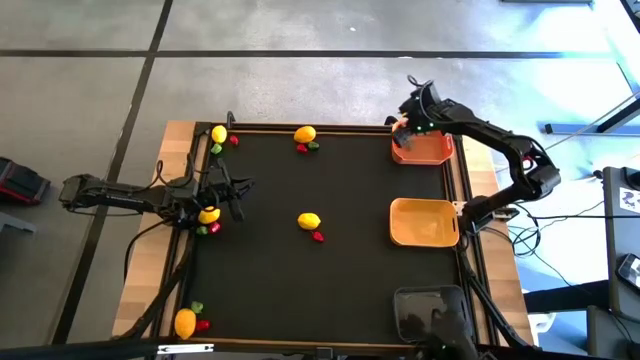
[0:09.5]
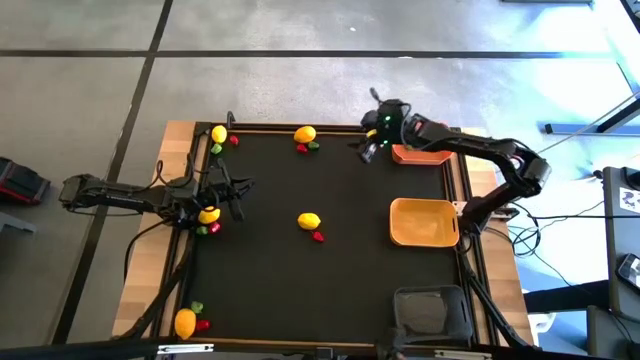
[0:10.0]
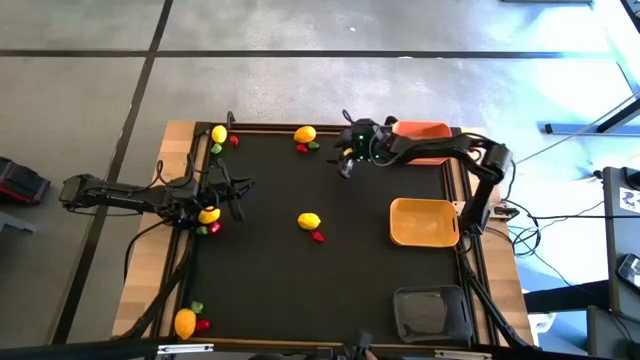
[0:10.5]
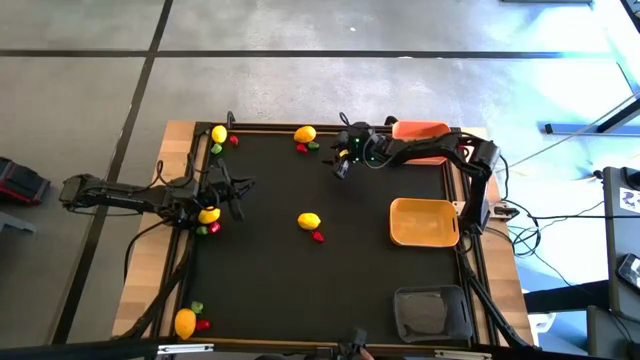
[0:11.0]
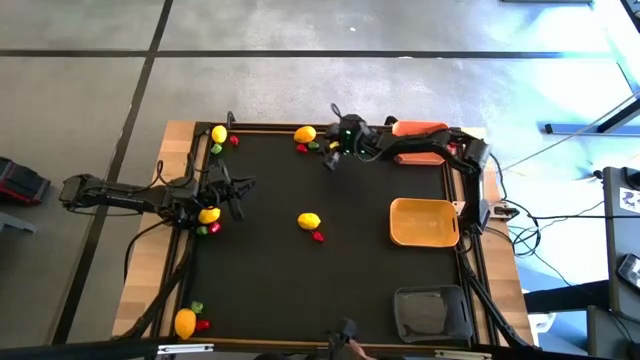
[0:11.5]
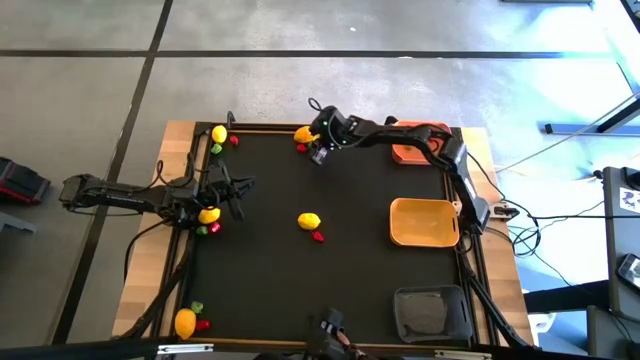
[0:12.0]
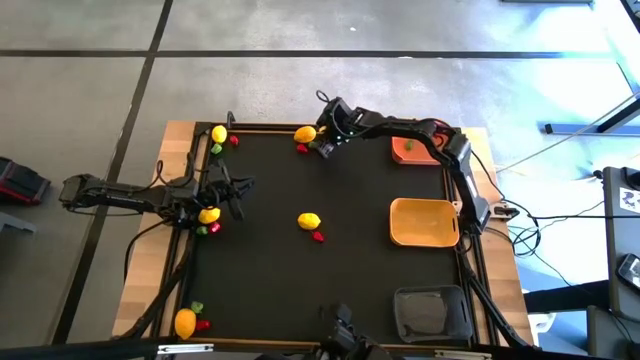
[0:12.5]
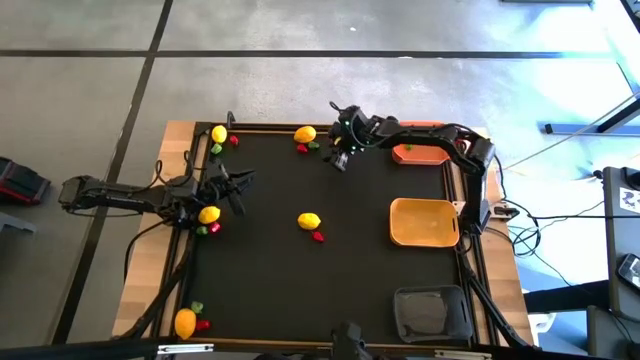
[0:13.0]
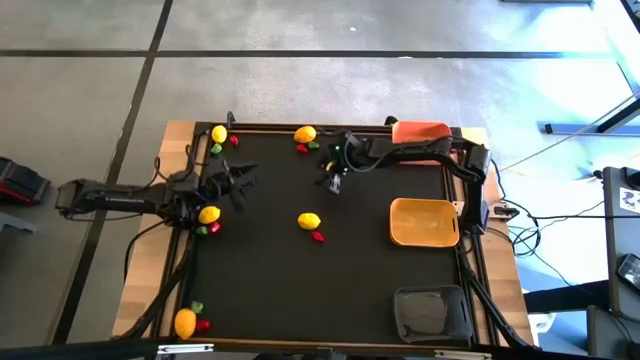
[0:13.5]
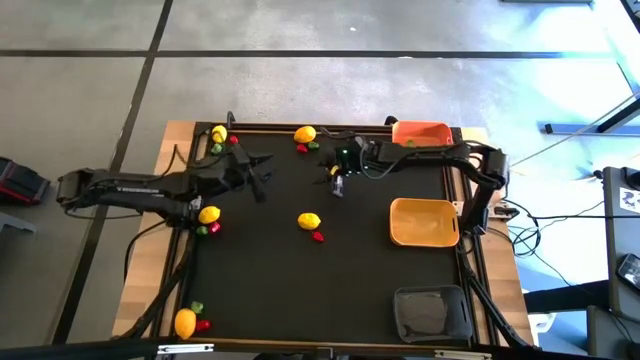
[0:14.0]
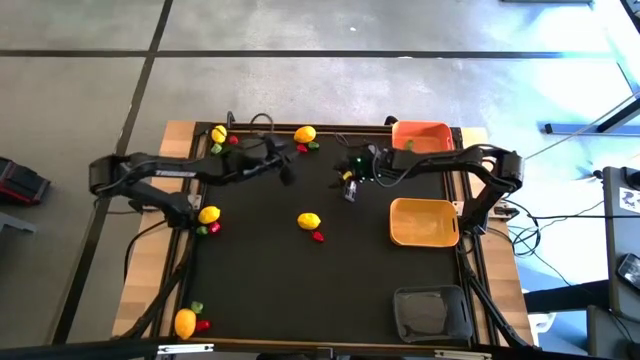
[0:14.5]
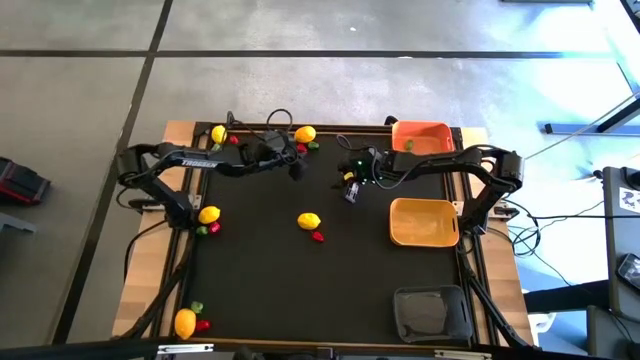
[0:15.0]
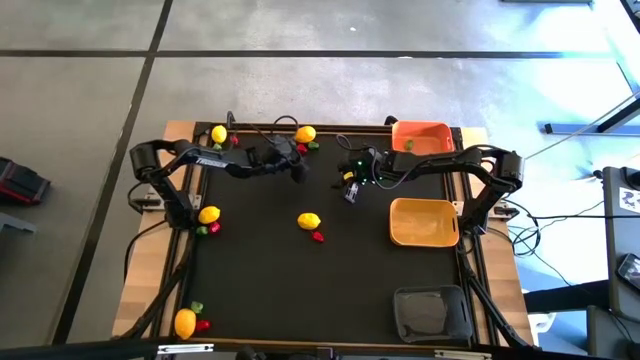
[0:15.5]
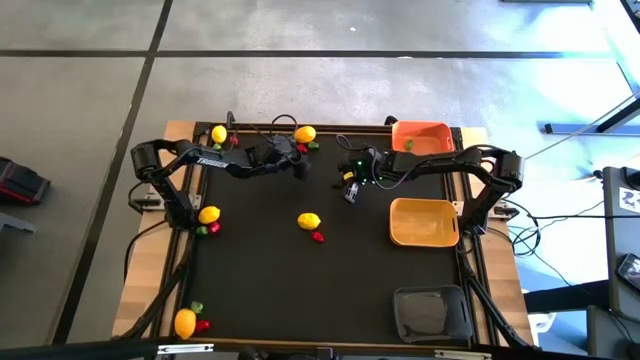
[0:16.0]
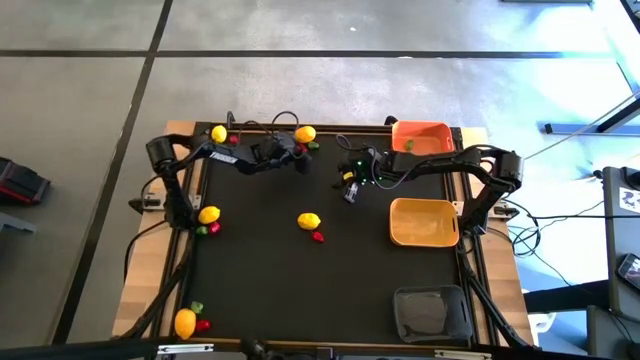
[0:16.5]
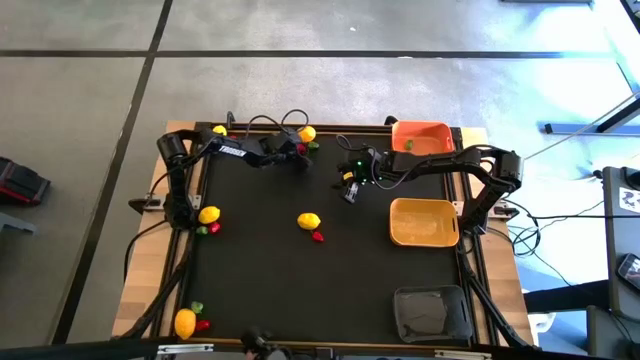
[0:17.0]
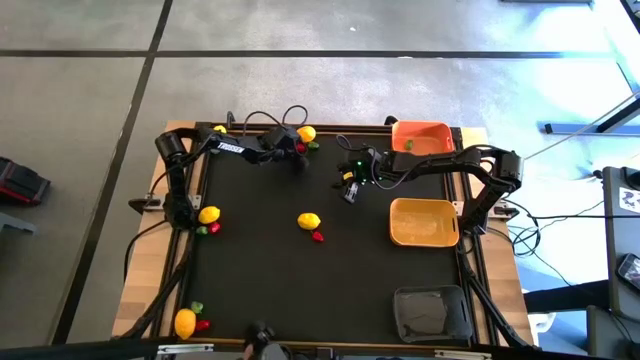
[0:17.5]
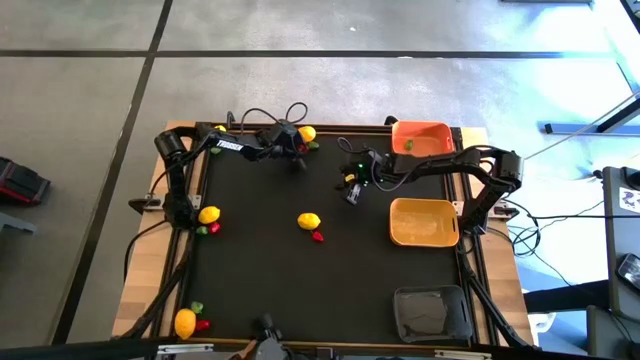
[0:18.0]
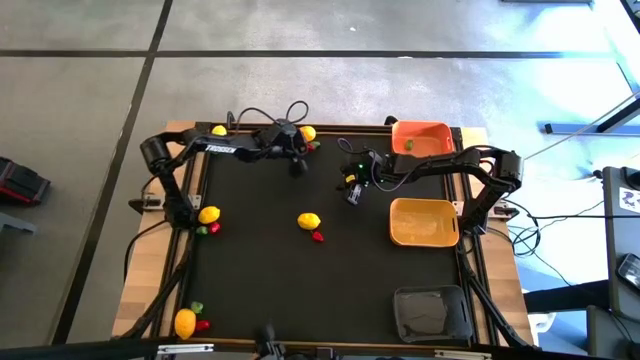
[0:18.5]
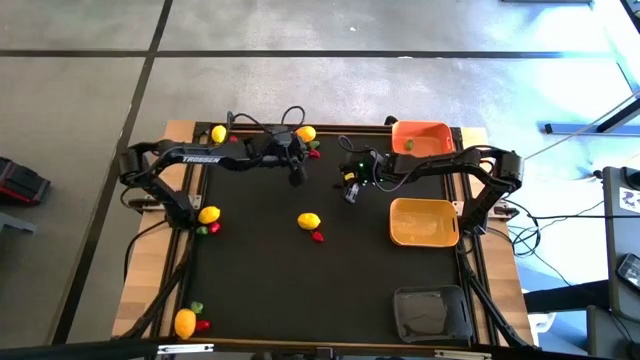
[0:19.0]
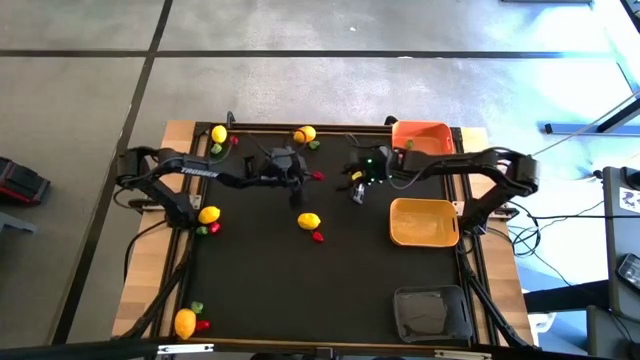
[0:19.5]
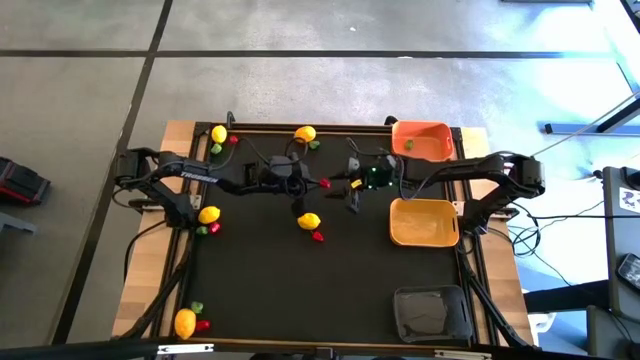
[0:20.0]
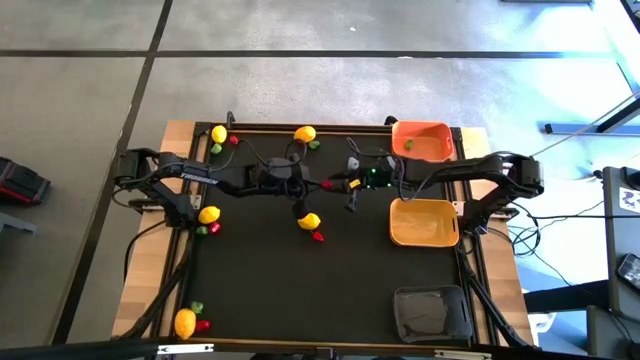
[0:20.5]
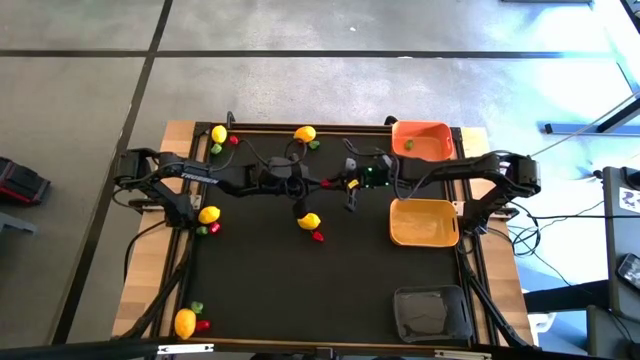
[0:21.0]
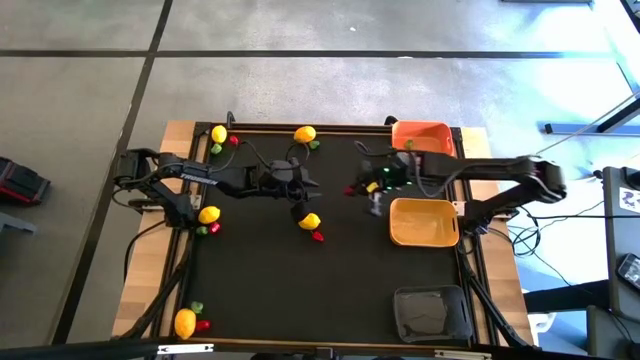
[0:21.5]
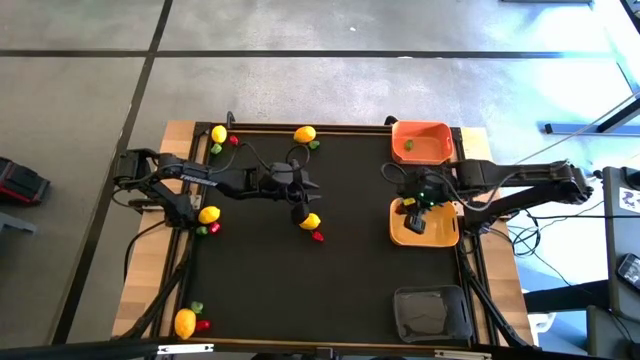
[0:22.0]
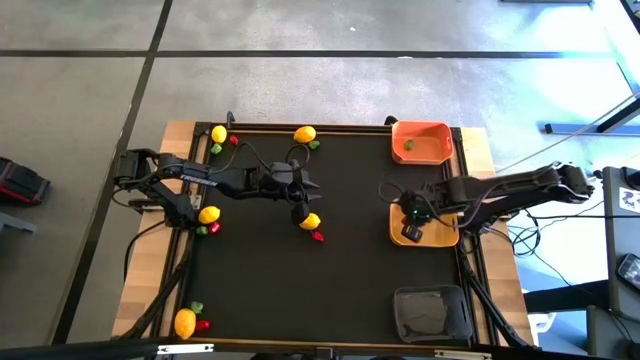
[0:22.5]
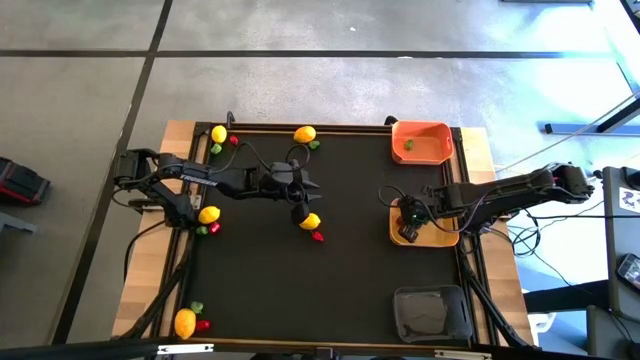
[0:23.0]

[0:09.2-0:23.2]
Task: Sort produce into baskets
Put the top right red chili pepper into the yellow bin

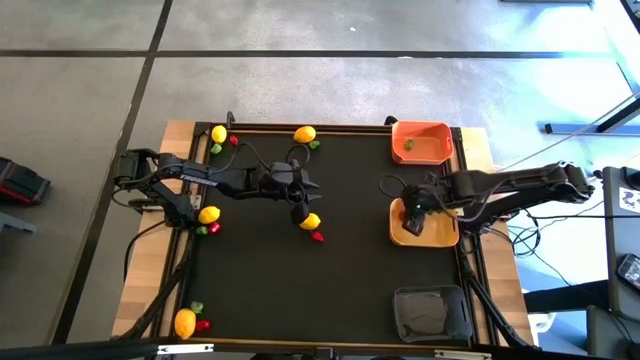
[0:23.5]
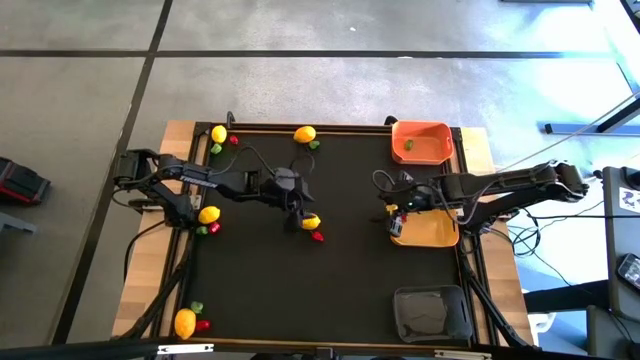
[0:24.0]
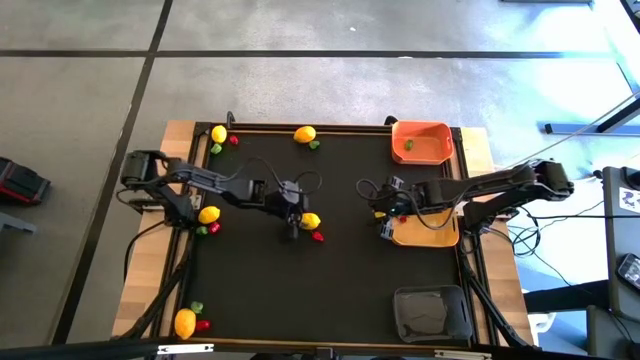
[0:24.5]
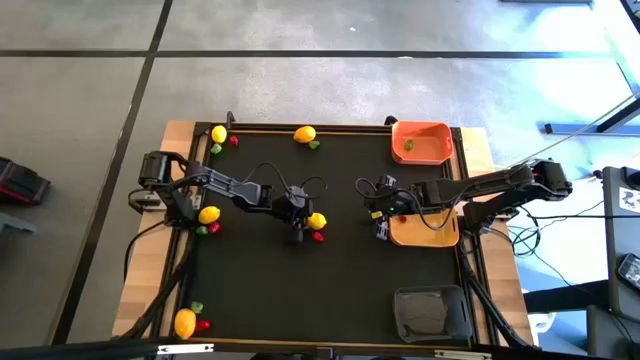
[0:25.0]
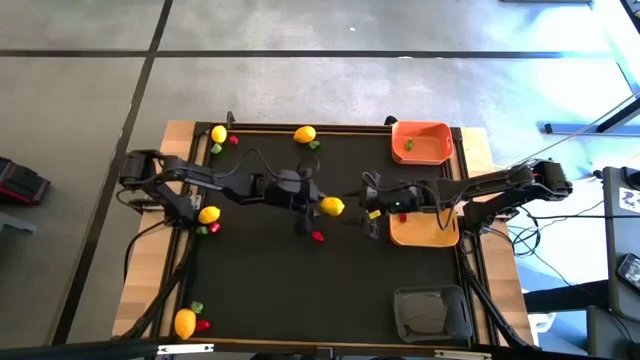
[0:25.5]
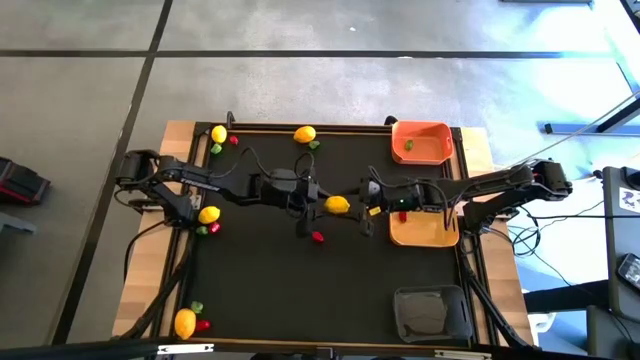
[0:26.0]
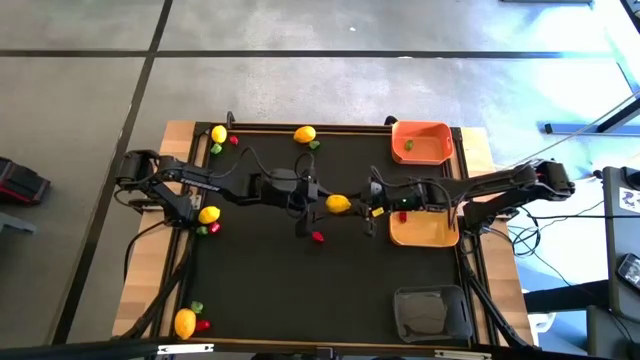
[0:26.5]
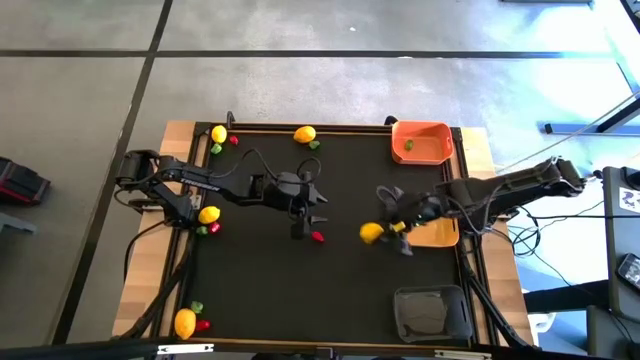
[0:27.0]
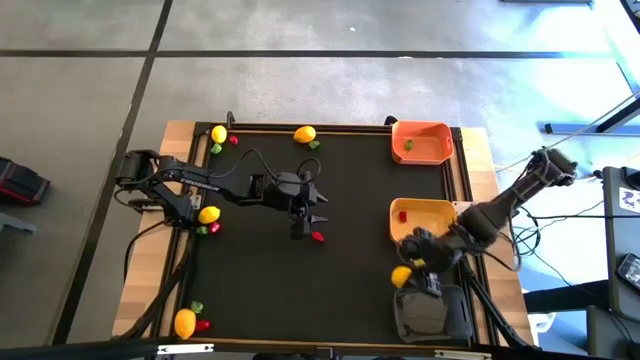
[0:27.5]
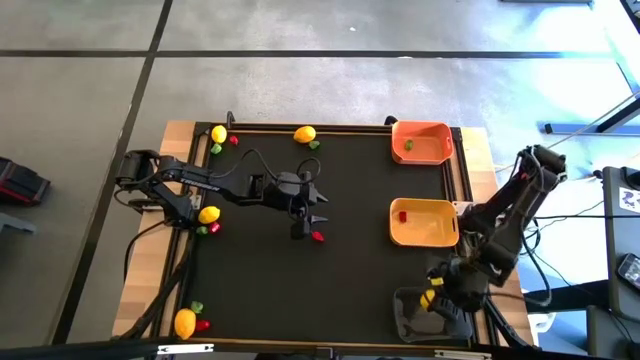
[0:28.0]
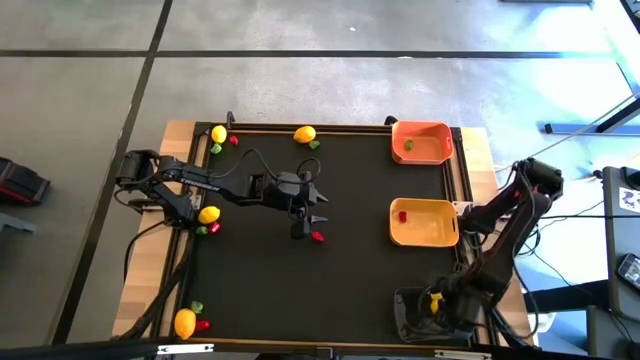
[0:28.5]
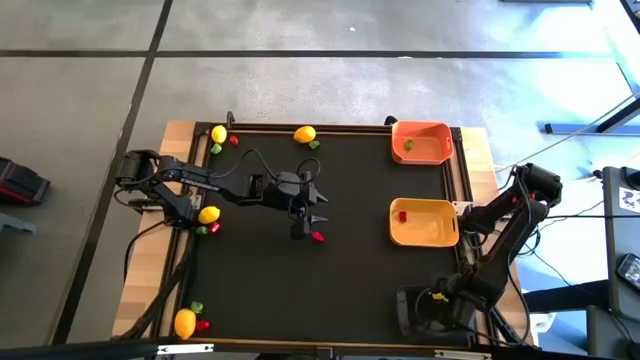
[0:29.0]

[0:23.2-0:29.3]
Put the middle right yellow lemon into the black bin
